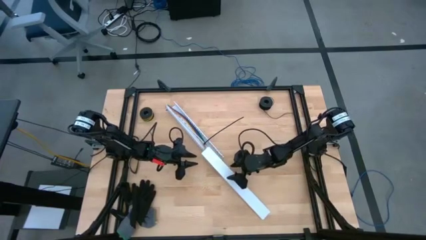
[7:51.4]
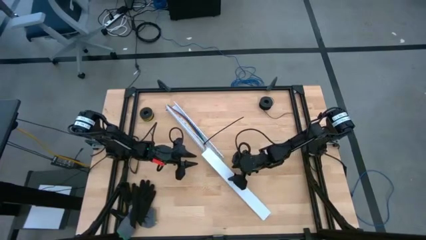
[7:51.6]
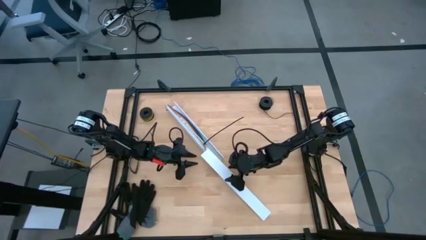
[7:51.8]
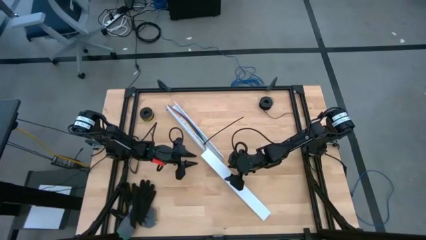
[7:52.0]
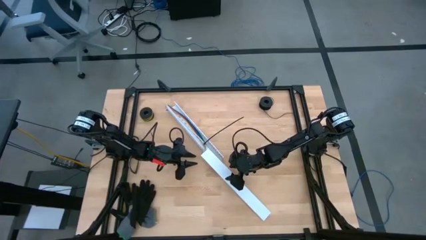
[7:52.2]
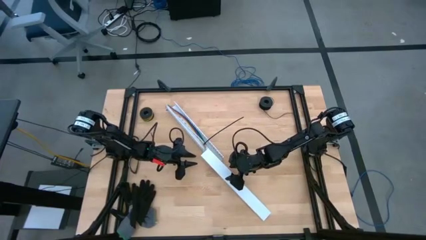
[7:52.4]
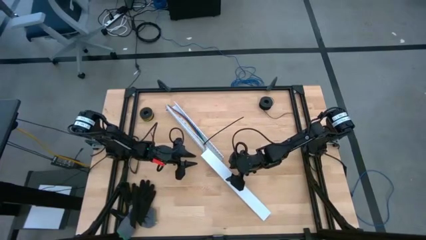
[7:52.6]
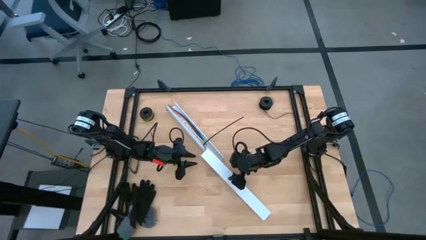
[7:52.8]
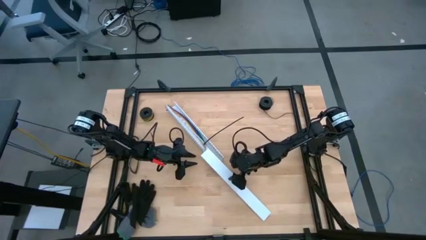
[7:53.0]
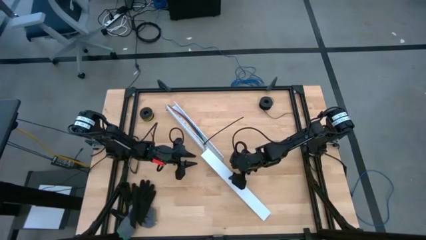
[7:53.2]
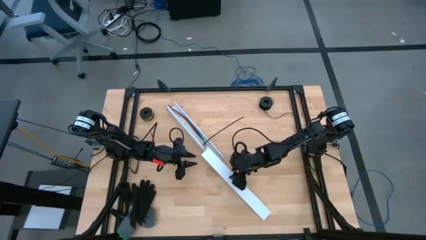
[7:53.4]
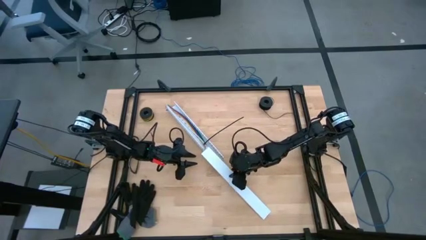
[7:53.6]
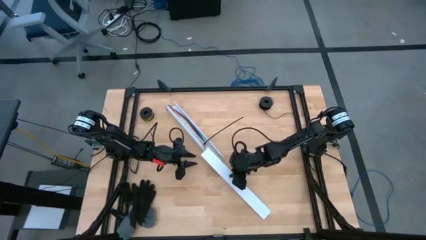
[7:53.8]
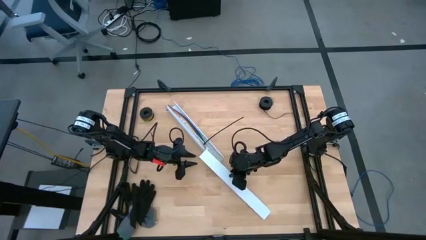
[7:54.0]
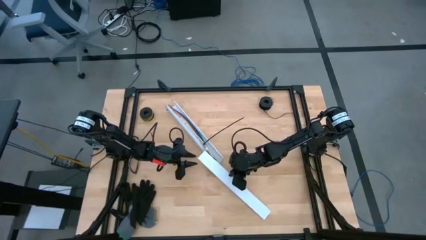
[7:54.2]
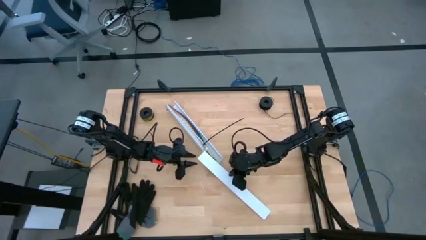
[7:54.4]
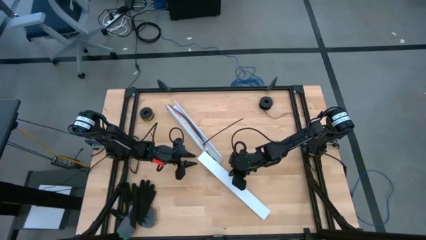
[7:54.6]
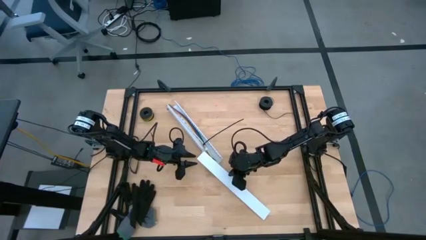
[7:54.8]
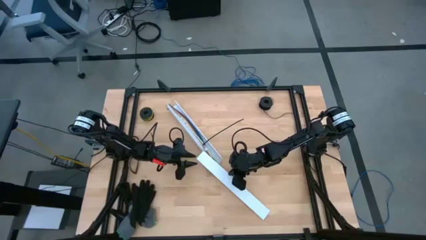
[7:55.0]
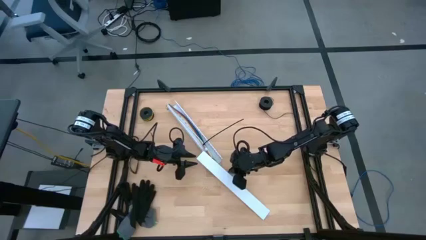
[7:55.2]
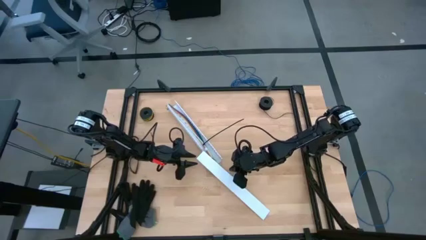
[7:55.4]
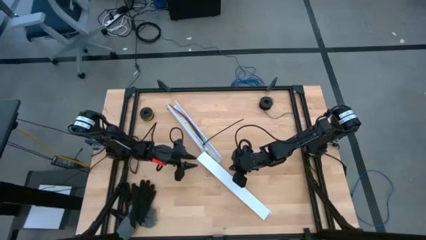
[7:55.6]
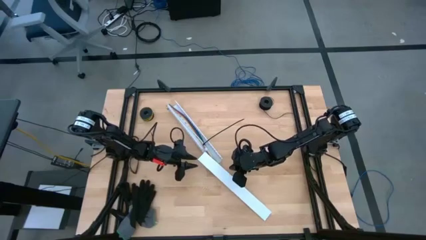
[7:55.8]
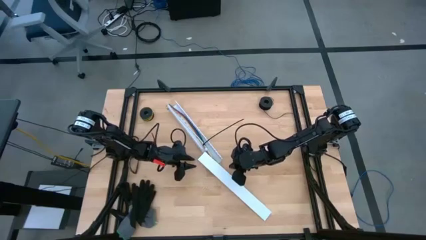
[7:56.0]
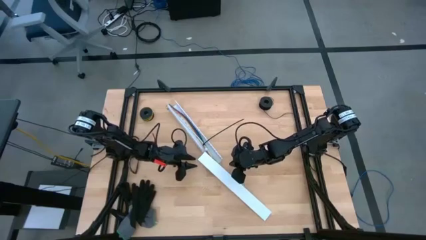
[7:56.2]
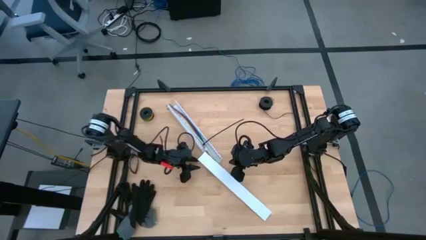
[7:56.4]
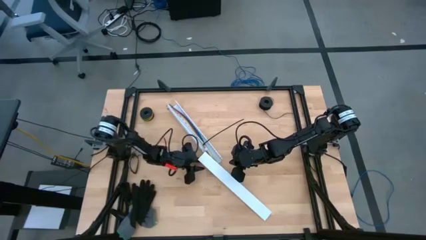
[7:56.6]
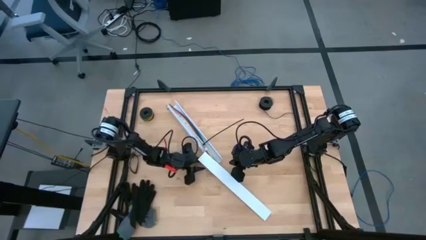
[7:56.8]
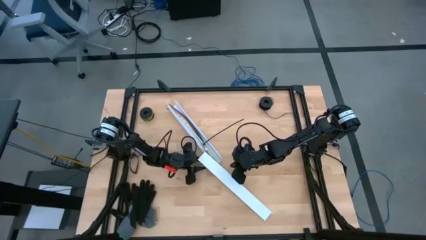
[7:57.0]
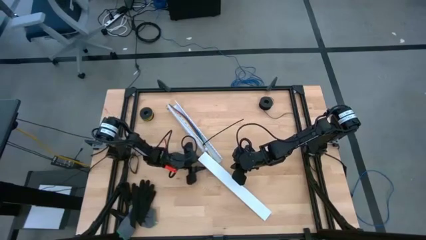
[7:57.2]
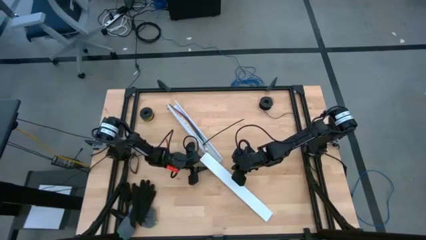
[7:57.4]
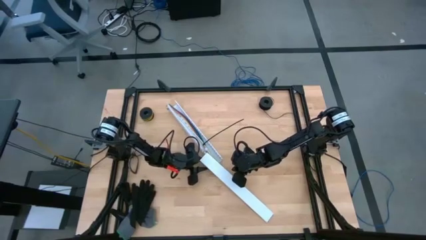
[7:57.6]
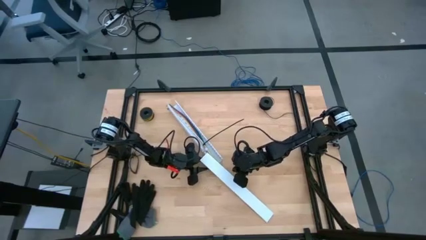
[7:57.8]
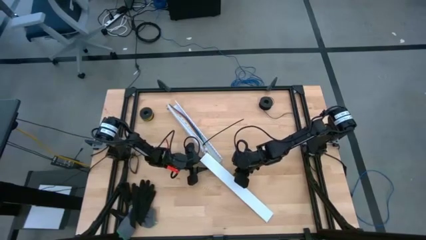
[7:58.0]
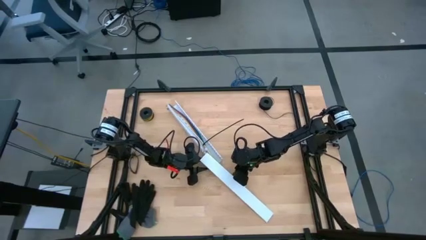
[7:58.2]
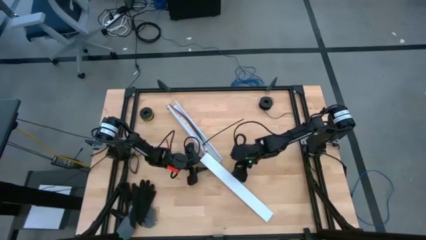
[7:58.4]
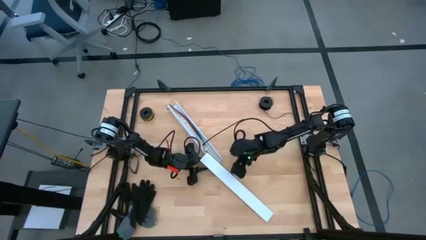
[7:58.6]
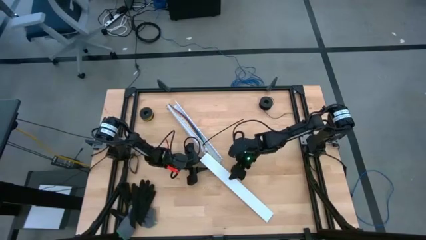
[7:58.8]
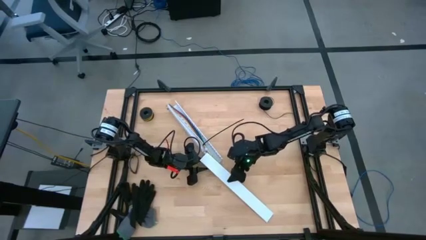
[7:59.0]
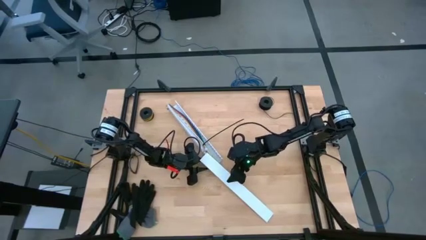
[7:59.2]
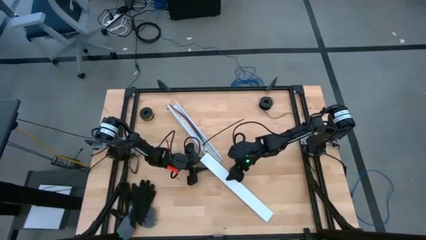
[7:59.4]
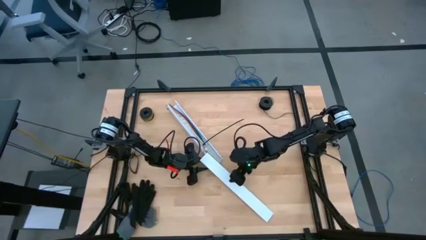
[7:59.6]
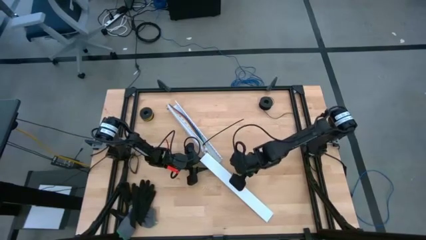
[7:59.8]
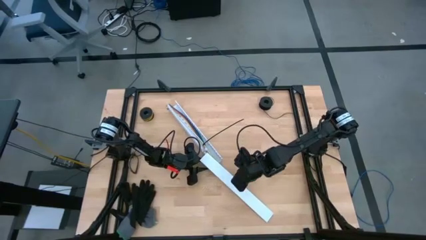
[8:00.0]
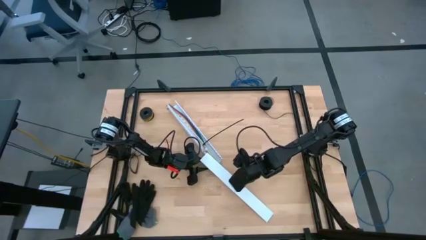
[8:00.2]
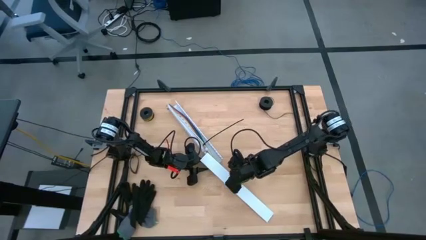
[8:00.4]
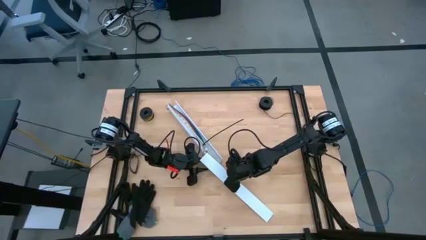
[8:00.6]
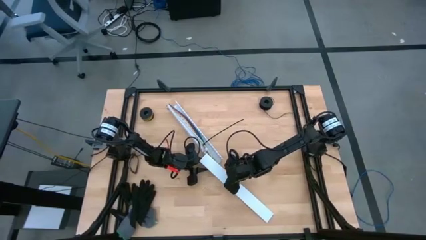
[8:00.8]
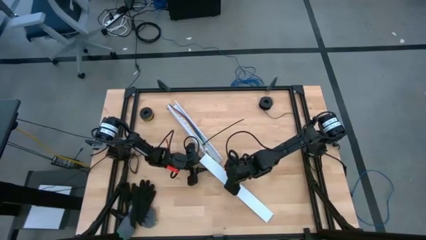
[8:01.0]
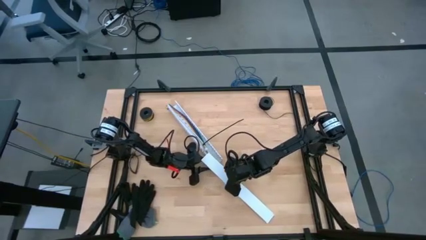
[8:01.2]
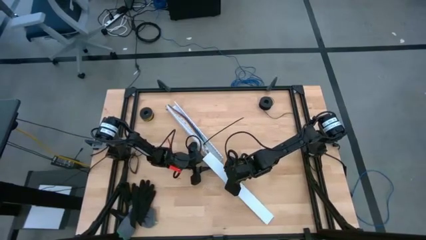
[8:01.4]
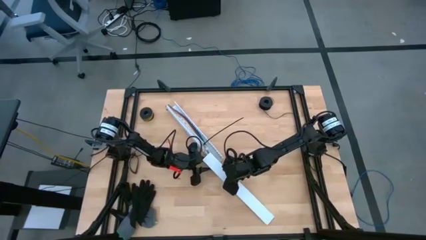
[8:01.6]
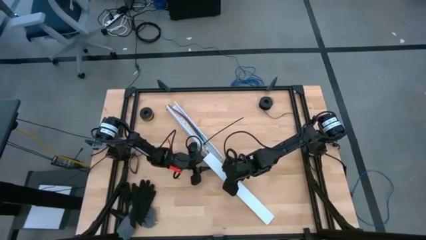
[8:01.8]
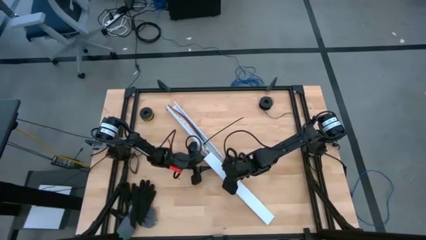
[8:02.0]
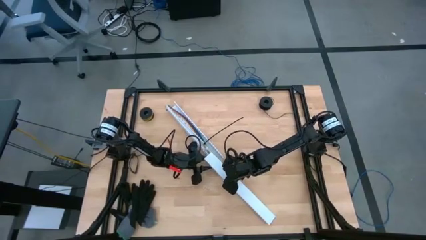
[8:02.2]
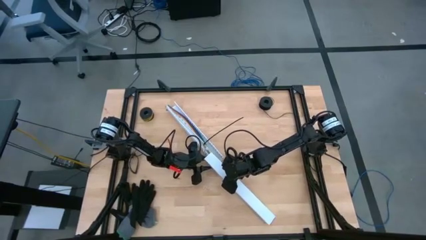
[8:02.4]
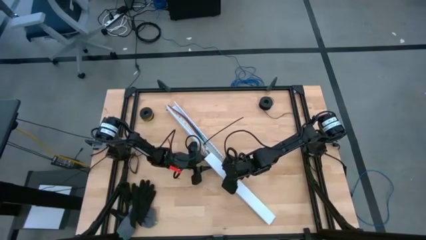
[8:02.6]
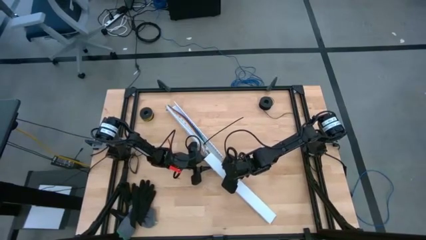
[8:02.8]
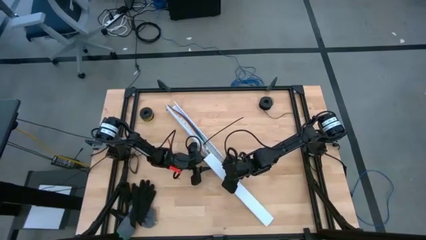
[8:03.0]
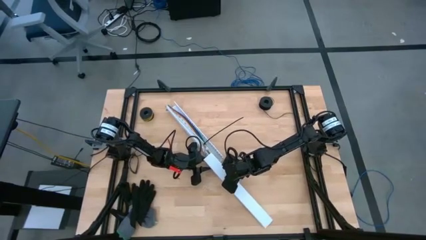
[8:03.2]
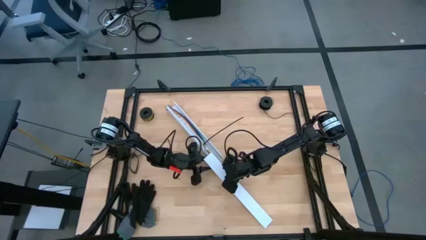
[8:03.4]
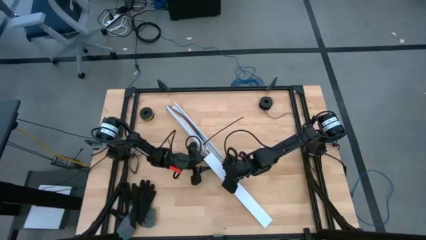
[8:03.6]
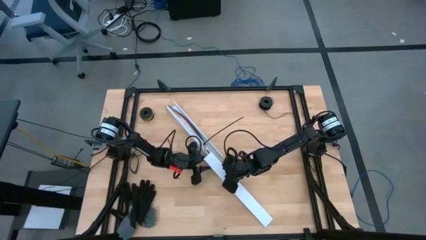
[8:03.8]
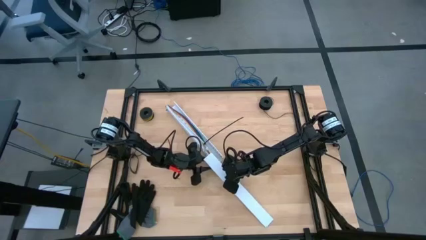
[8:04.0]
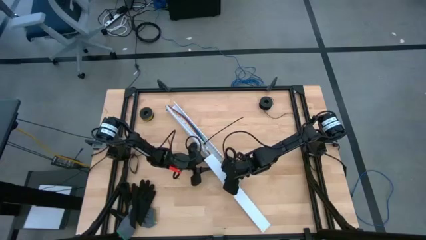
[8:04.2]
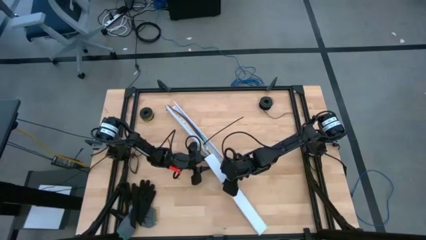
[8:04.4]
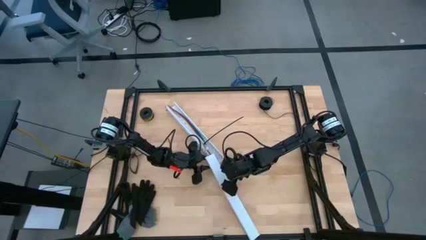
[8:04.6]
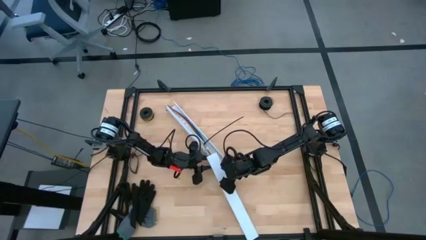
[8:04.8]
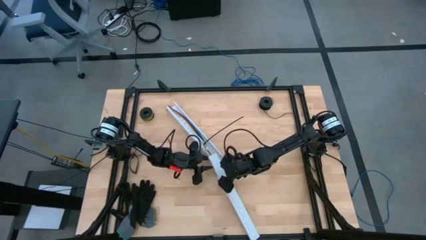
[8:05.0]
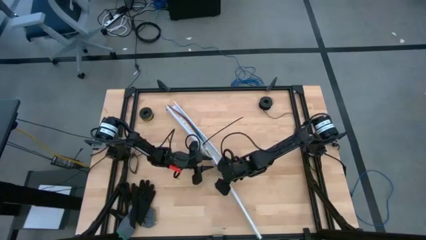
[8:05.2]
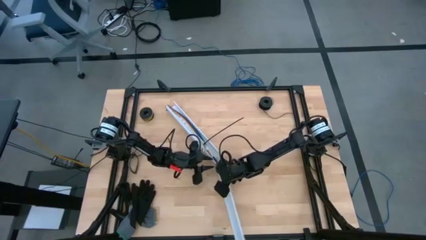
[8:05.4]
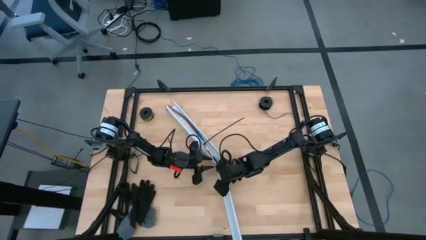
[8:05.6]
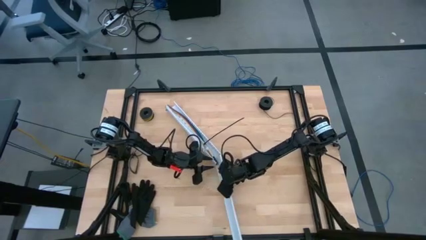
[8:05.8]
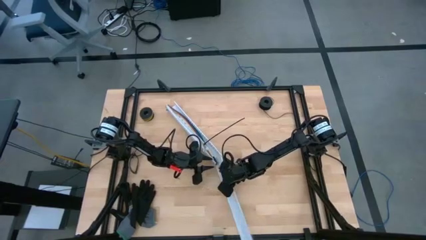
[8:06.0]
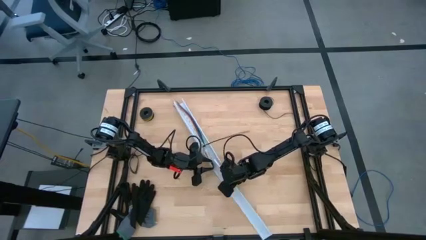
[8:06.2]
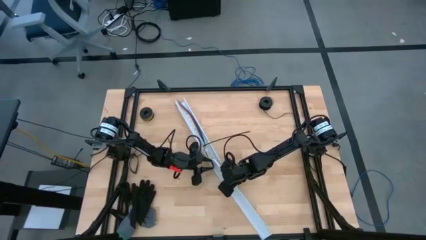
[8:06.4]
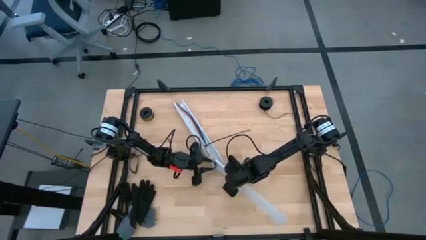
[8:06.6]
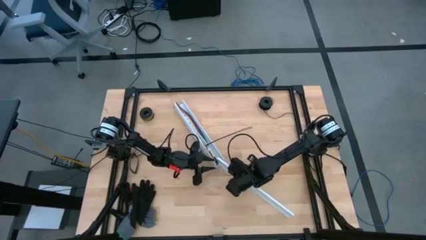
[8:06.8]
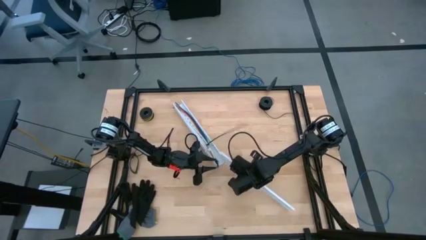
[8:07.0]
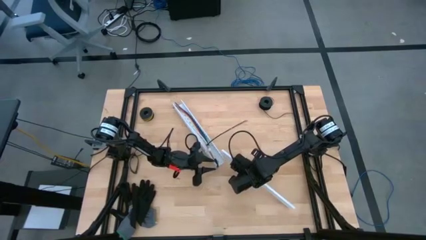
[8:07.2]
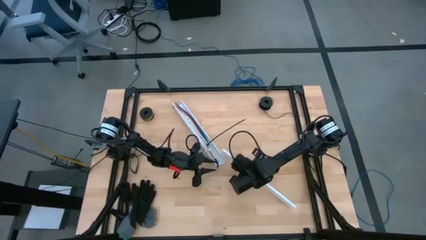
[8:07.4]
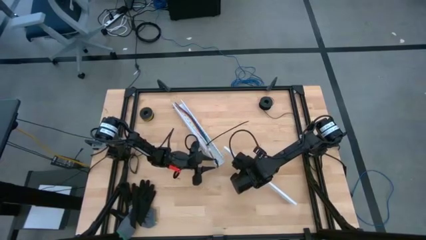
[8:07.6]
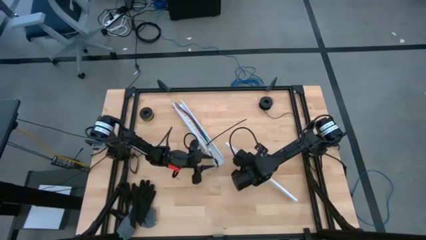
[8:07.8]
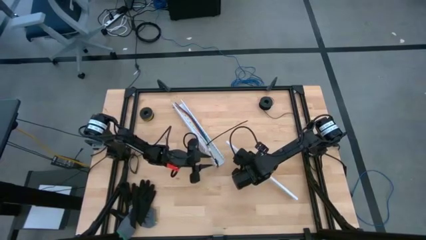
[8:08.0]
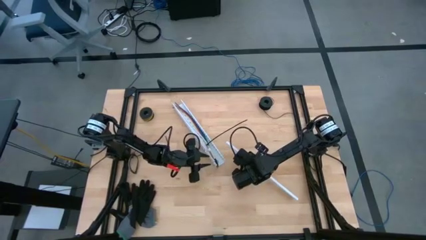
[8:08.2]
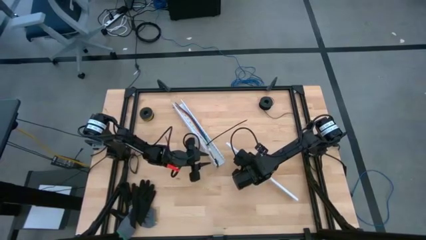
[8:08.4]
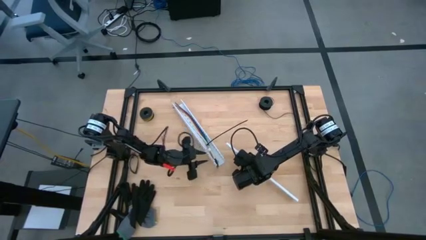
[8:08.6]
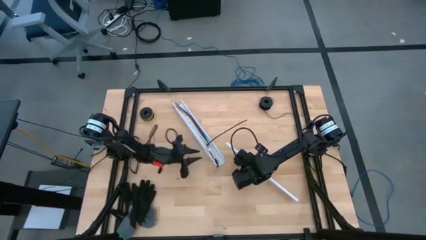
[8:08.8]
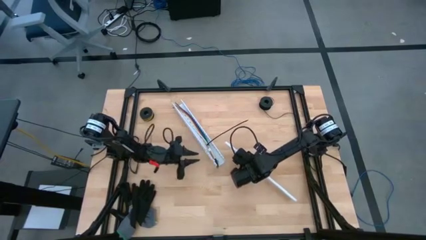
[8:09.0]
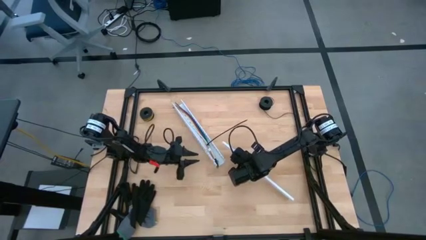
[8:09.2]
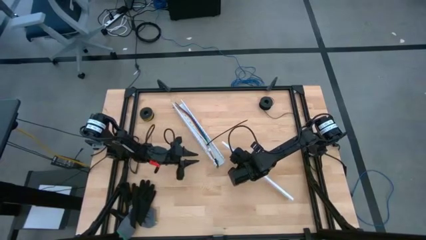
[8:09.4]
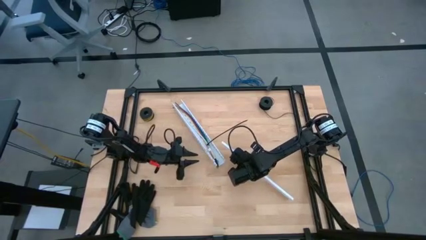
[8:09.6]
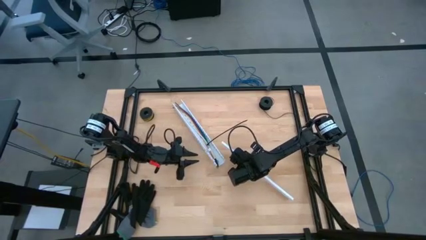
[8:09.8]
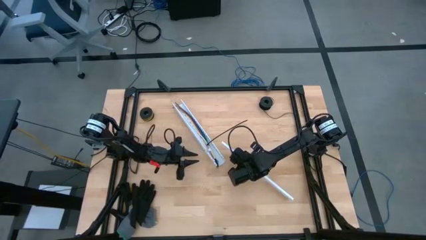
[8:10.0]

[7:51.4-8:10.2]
Task: Ziptie cables
Close the white cable duct
